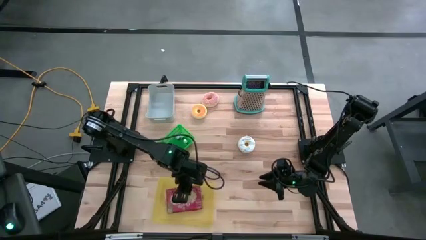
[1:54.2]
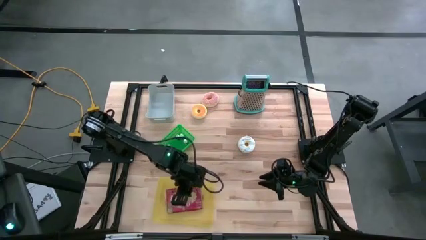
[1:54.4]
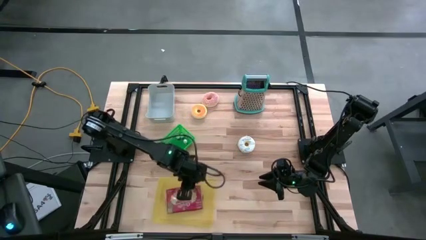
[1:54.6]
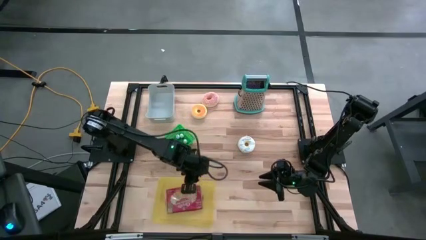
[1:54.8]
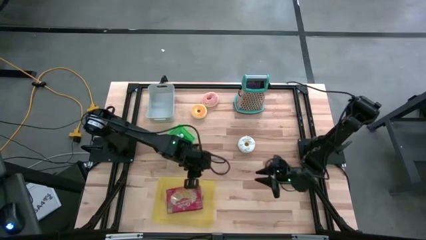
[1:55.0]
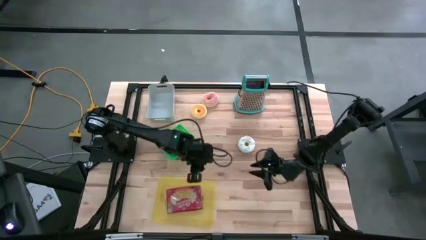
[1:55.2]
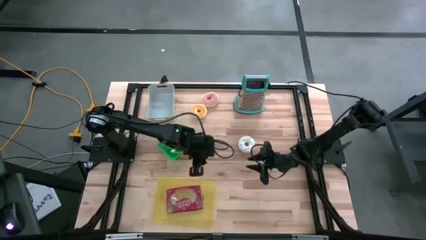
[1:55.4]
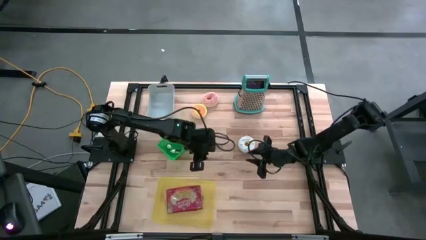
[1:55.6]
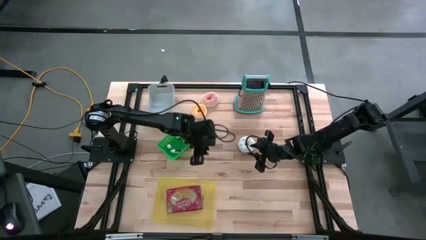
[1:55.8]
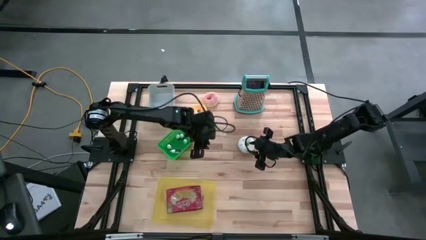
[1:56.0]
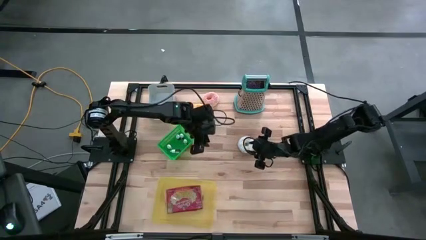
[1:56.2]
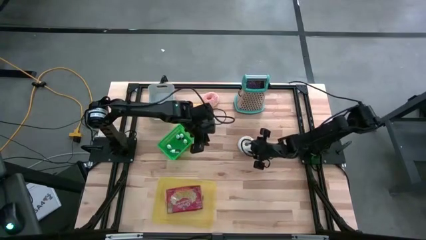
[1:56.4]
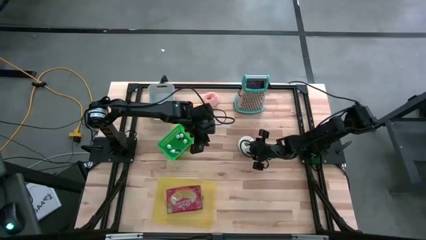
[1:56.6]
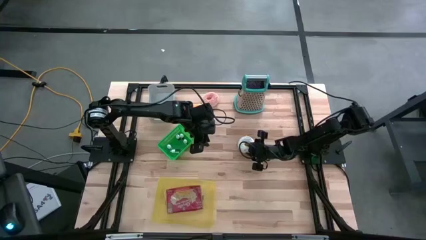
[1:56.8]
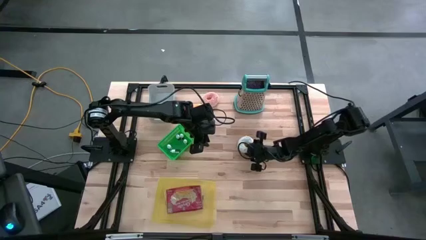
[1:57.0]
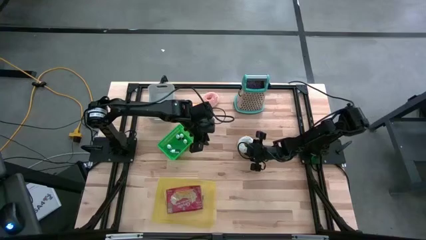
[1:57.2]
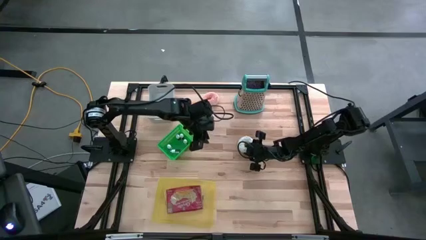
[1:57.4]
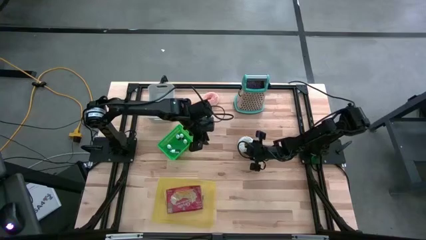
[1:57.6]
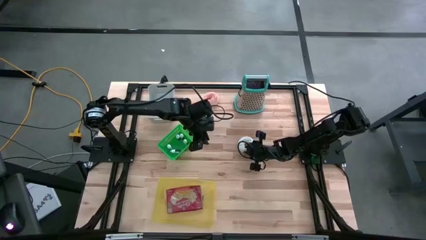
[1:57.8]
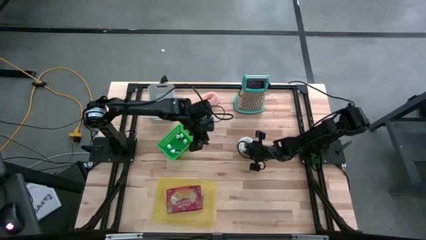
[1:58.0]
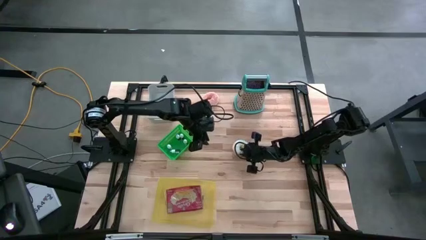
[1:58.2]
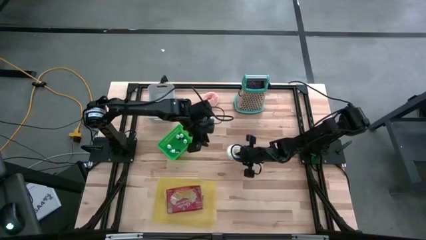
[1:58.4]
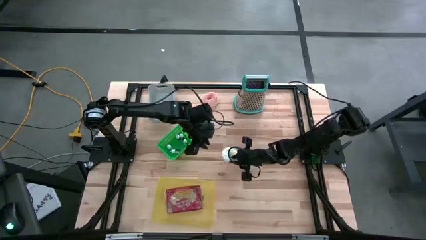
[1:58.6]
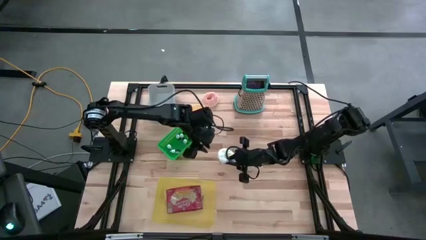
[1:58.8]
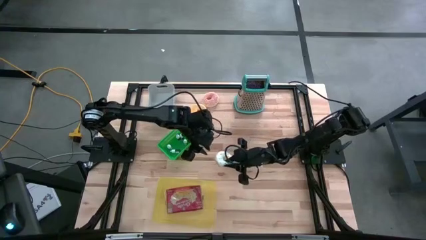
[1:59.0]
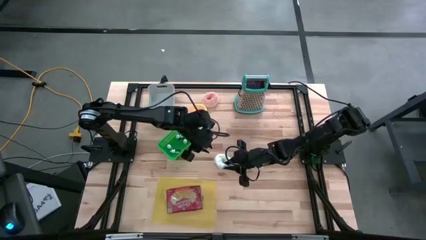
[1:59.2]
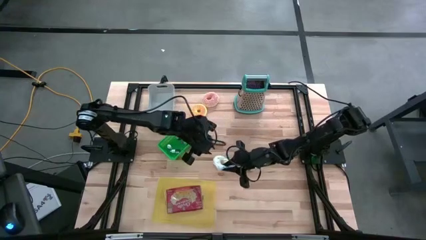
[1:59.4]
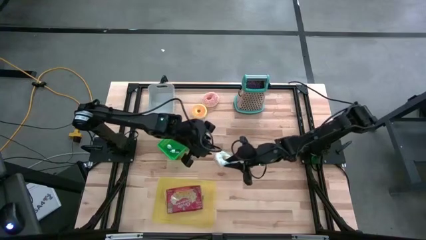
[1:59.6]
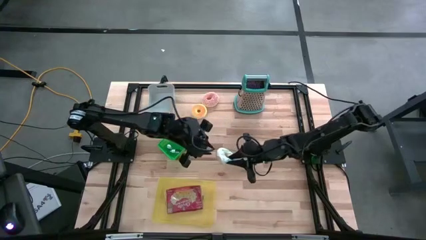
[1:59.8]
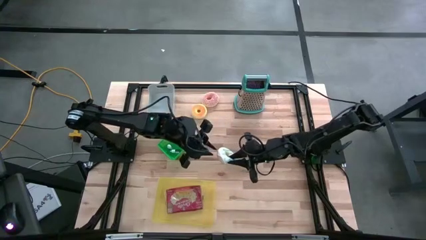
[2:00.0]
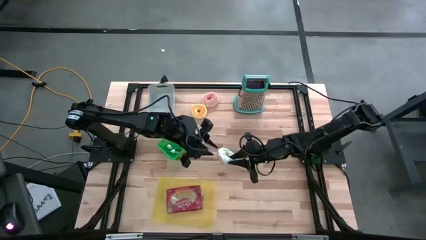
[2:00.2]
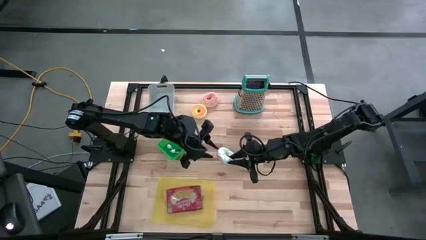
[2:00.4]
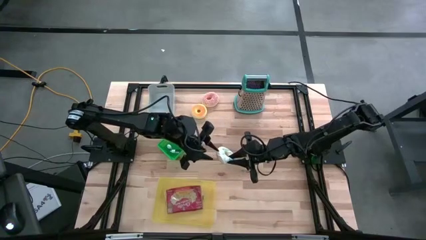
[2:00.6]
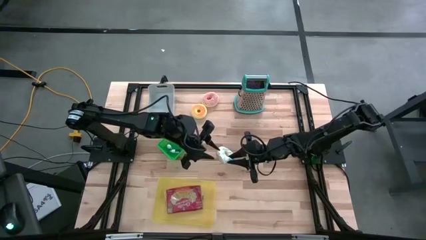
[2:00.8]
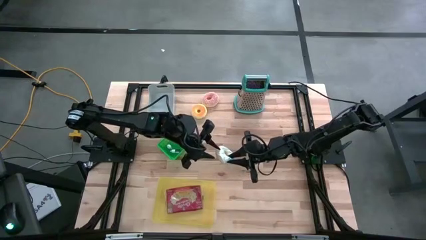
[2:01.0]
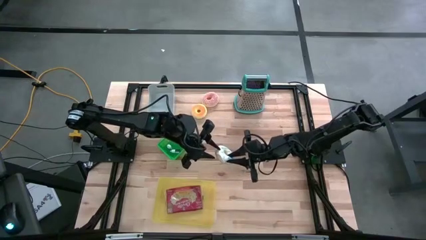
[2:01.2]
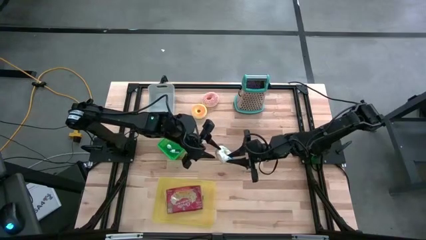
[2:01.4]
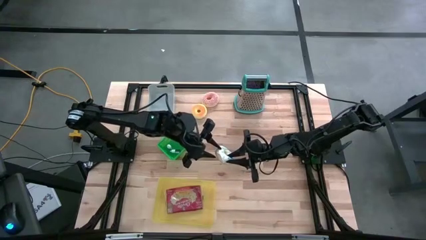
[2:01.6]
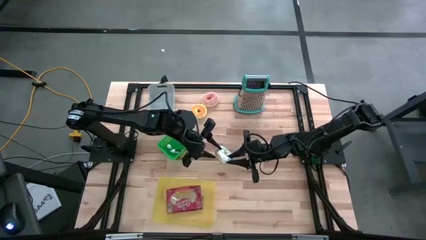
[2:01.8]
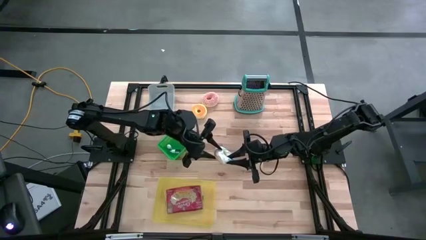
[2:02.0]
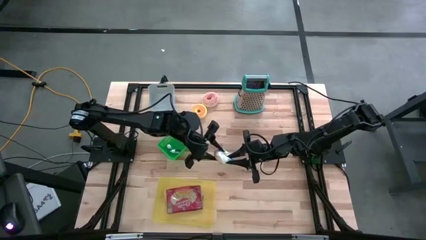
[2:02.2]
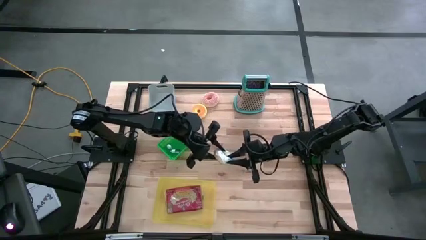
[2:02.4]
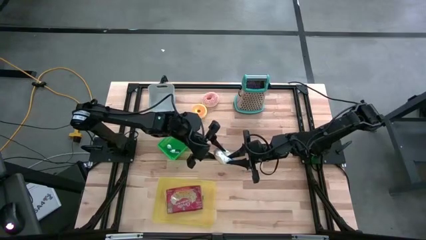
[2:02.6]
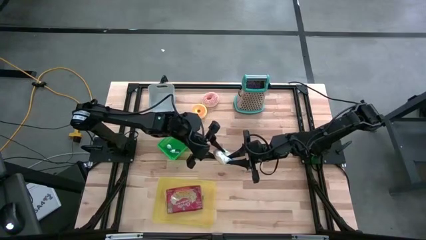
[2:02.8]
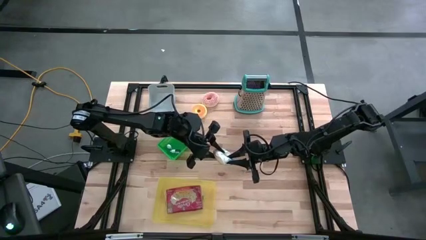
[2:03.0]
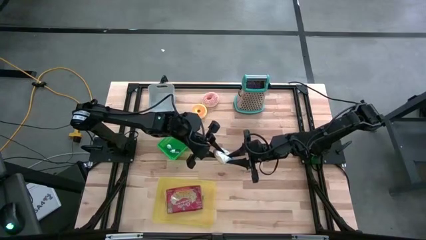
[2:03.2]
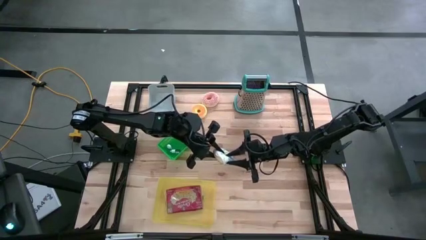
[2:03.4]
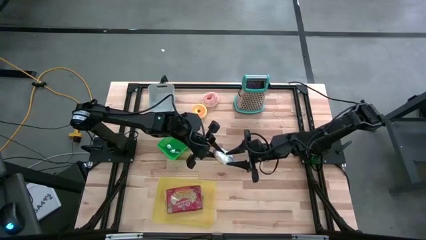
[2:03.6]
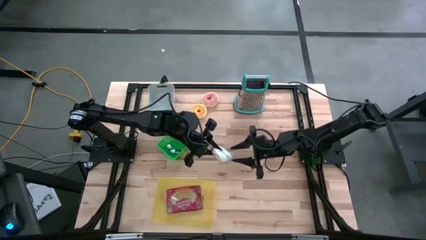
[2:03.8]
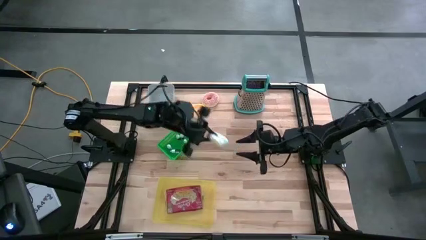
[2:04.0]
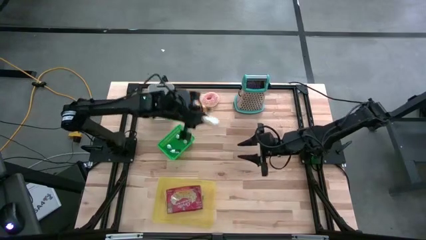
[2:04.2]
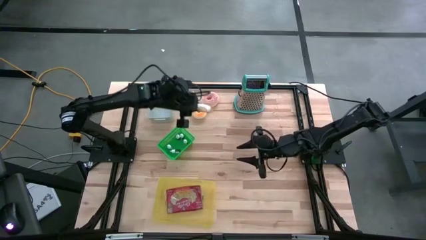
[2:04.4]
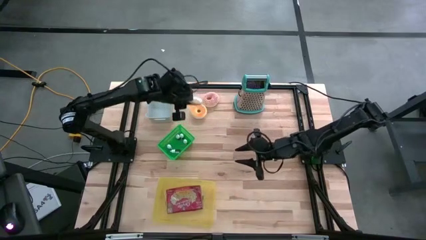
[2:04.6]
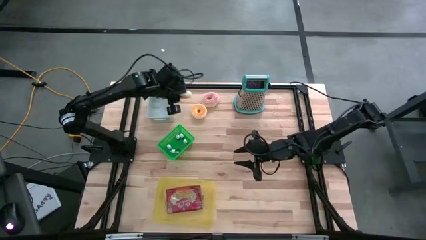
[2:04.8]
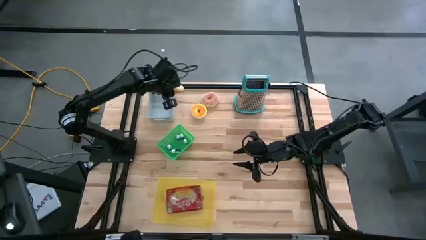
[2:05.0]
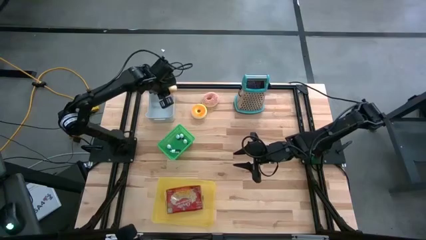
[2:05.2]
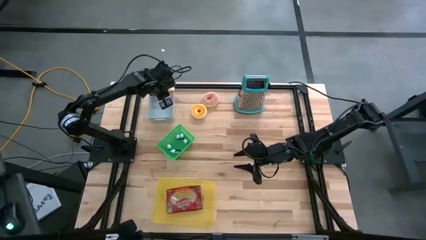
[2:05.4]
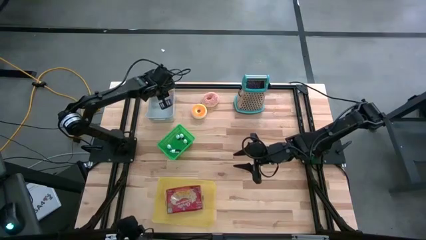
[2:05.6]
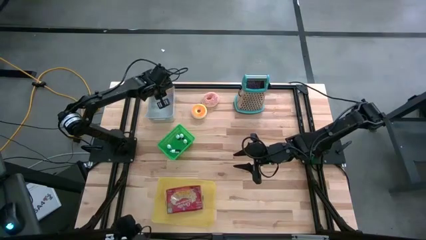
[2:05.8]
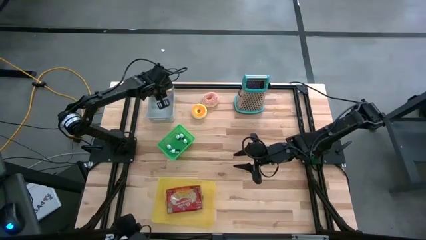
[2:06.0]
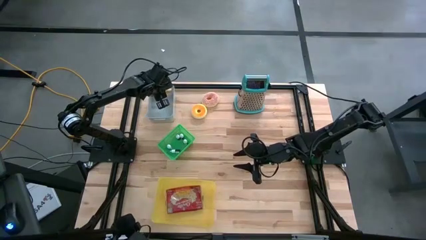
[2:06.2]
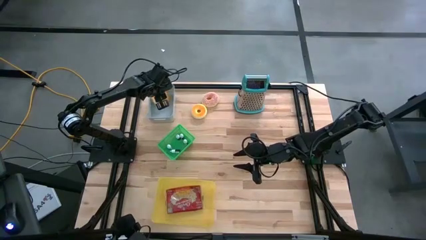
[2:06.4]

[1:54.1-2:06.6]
Put the white and blue donut into the gray bin
